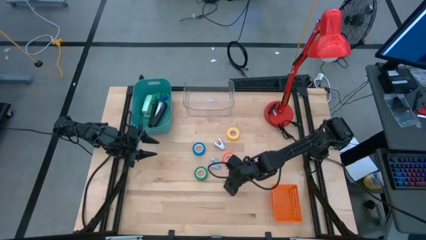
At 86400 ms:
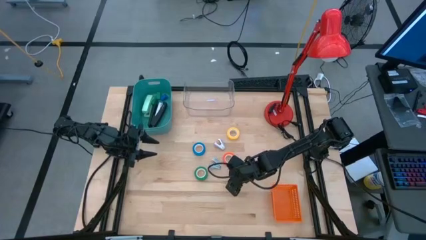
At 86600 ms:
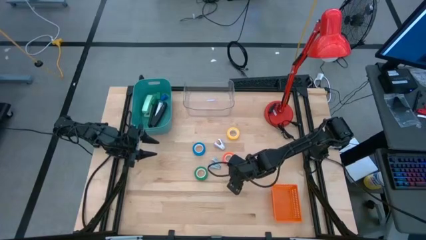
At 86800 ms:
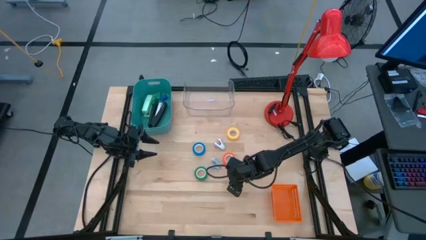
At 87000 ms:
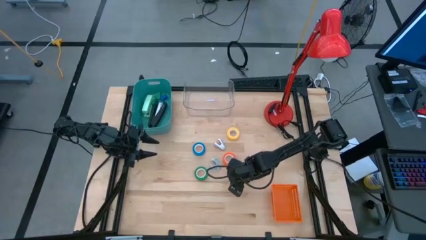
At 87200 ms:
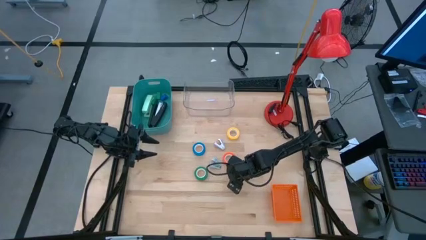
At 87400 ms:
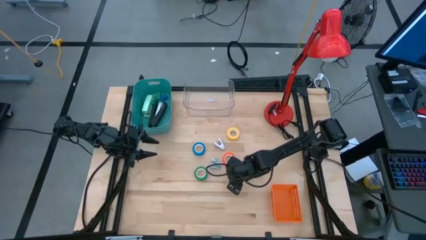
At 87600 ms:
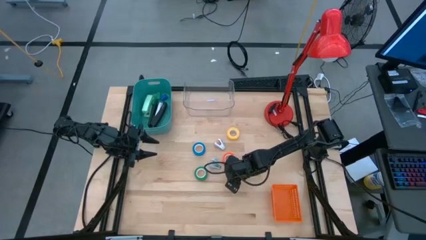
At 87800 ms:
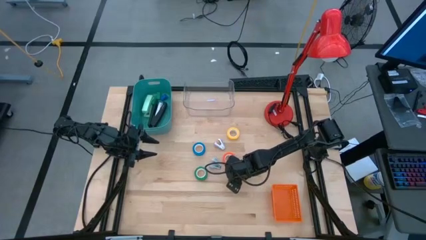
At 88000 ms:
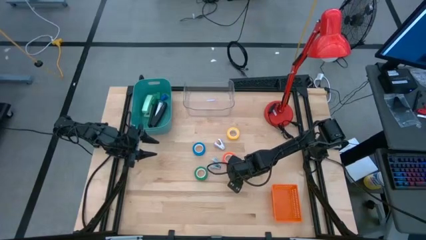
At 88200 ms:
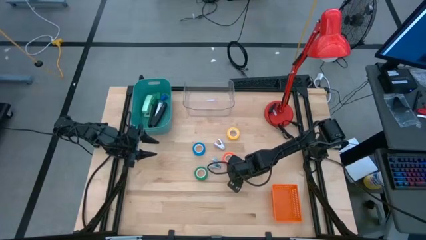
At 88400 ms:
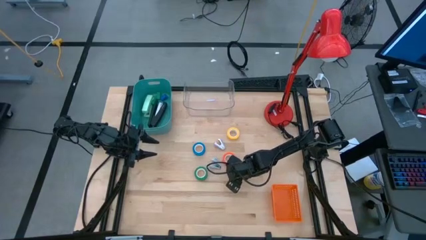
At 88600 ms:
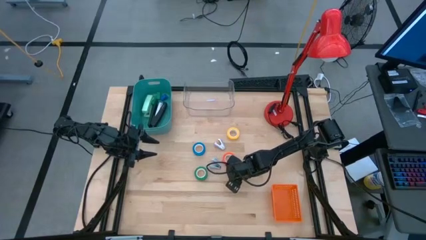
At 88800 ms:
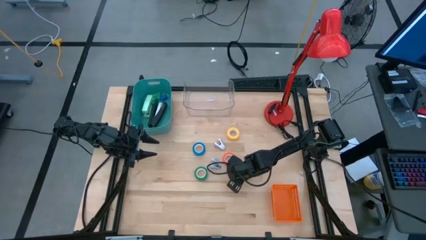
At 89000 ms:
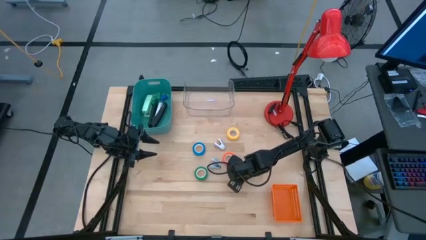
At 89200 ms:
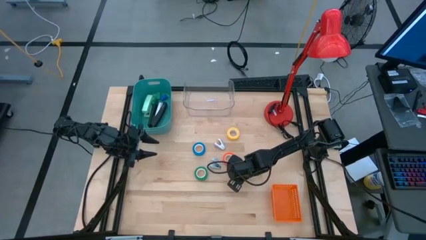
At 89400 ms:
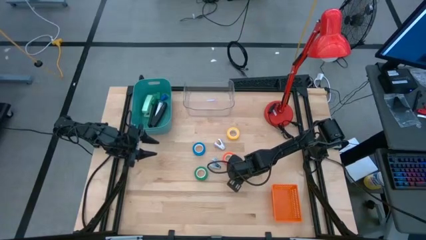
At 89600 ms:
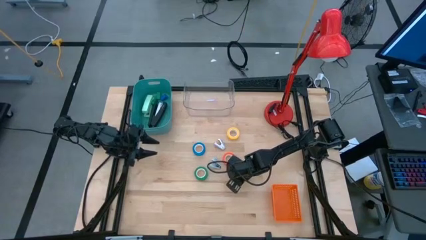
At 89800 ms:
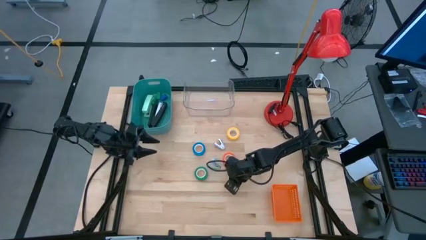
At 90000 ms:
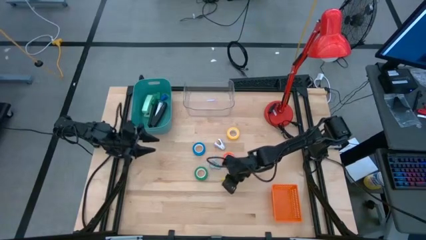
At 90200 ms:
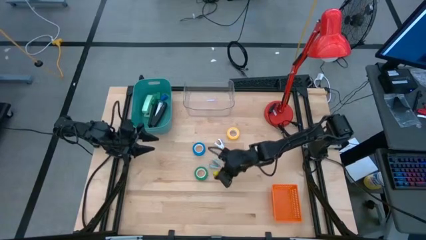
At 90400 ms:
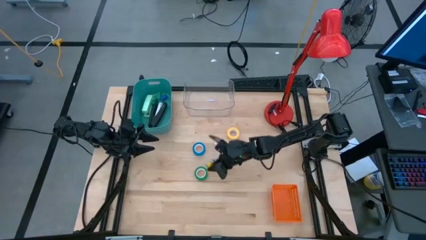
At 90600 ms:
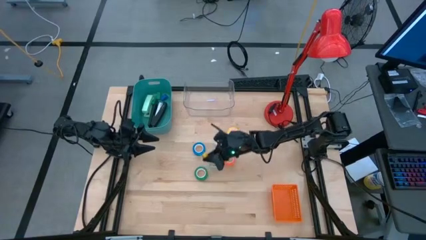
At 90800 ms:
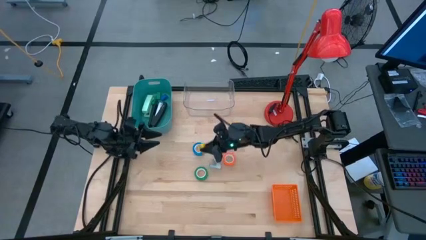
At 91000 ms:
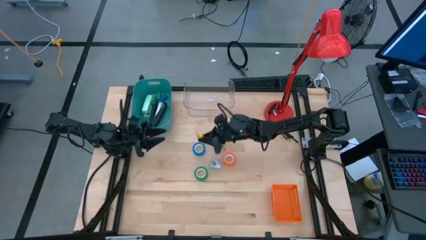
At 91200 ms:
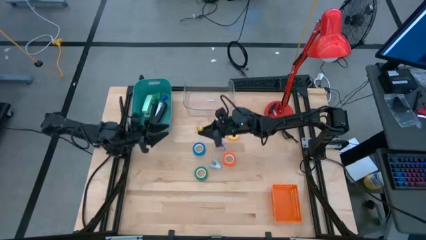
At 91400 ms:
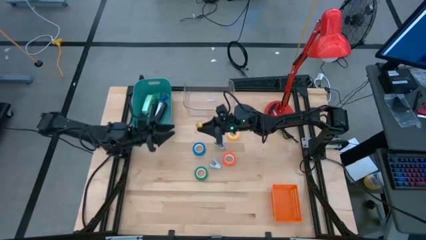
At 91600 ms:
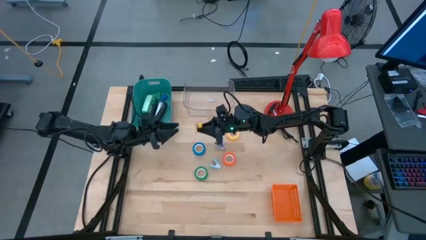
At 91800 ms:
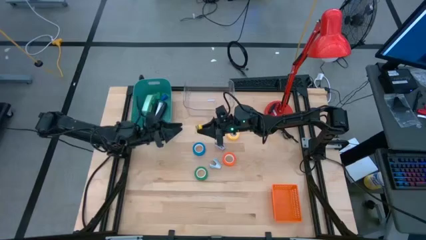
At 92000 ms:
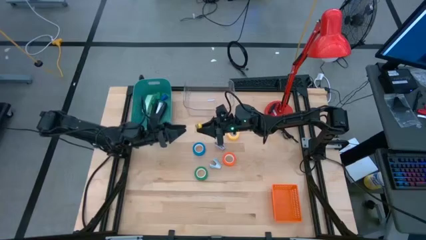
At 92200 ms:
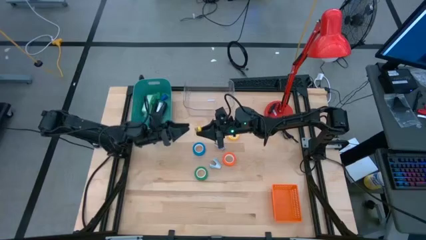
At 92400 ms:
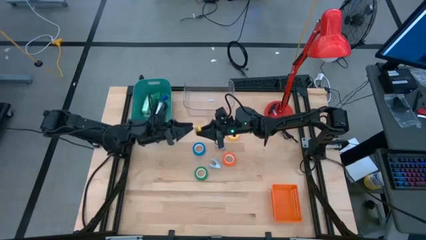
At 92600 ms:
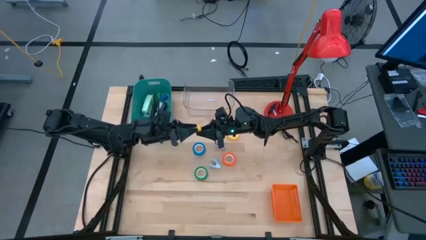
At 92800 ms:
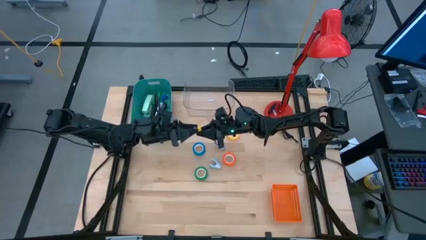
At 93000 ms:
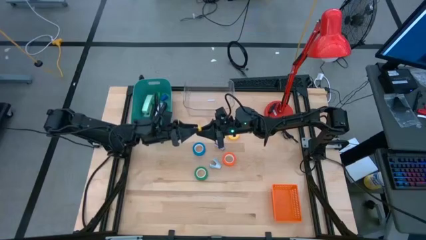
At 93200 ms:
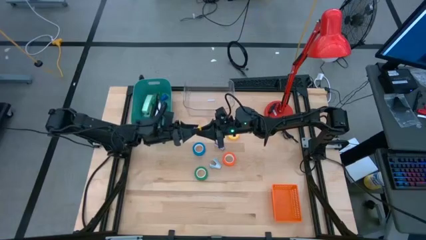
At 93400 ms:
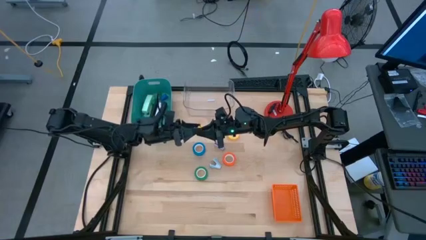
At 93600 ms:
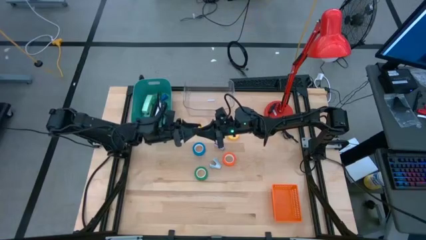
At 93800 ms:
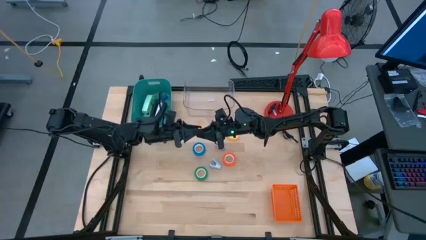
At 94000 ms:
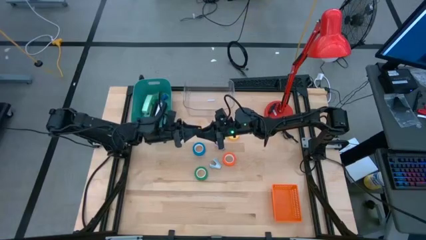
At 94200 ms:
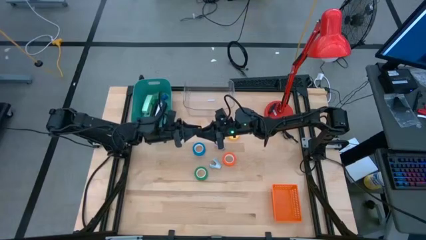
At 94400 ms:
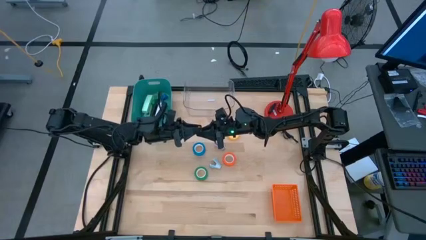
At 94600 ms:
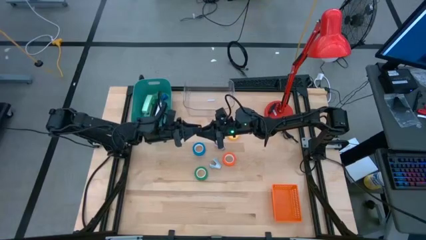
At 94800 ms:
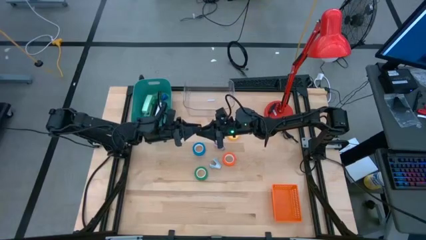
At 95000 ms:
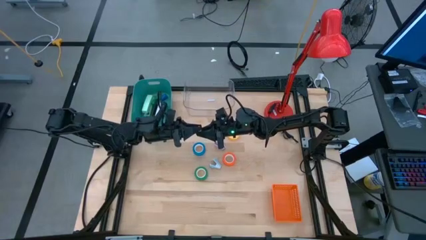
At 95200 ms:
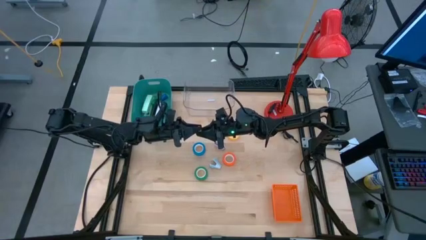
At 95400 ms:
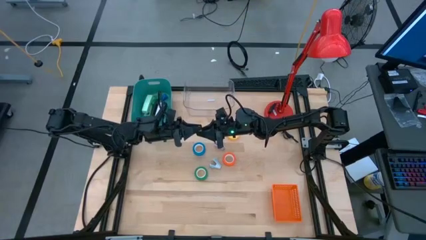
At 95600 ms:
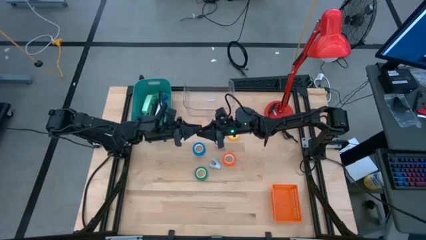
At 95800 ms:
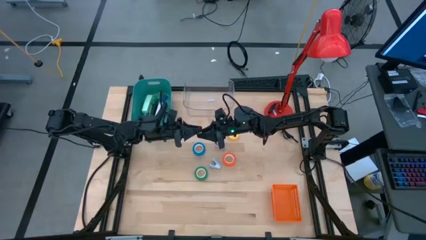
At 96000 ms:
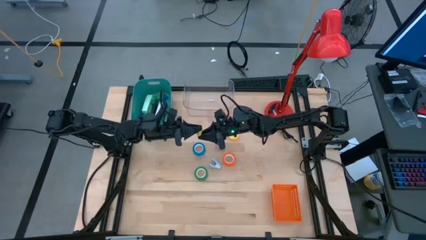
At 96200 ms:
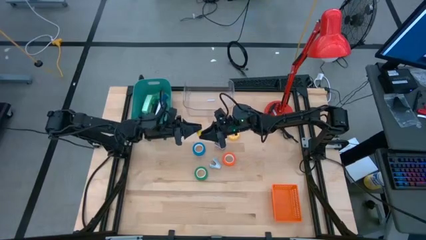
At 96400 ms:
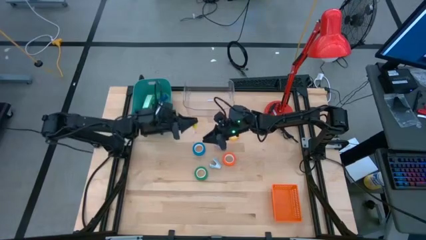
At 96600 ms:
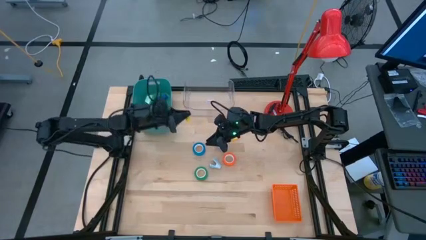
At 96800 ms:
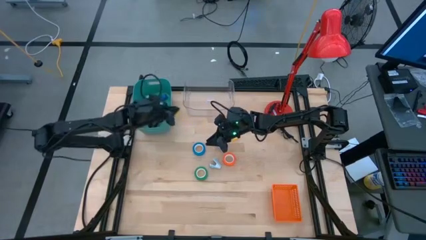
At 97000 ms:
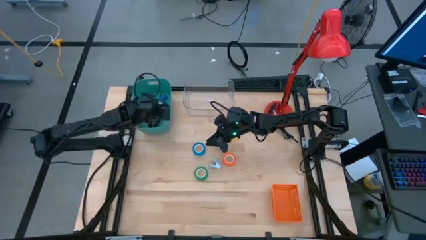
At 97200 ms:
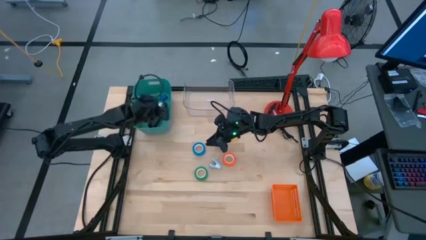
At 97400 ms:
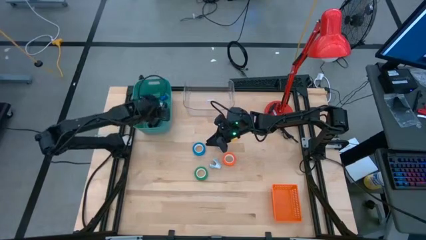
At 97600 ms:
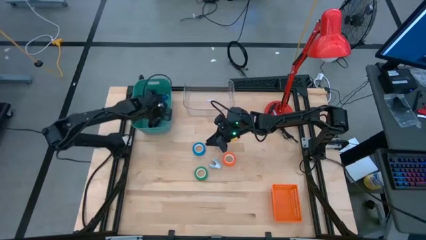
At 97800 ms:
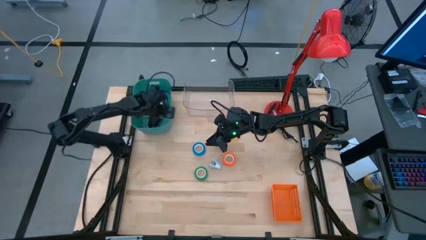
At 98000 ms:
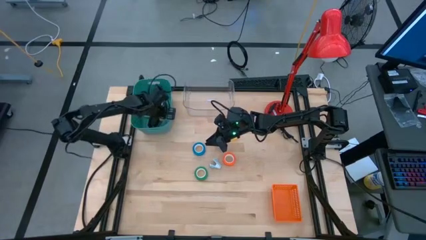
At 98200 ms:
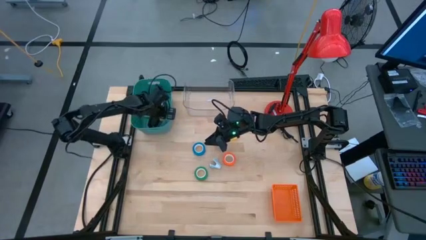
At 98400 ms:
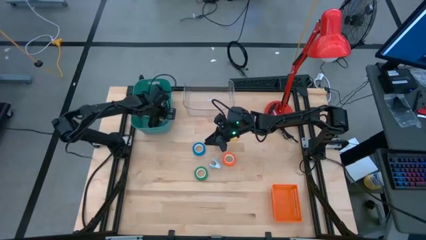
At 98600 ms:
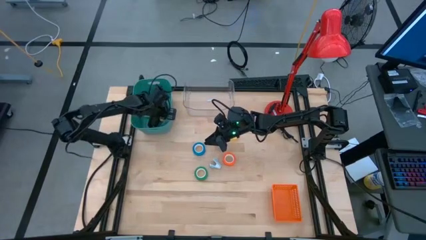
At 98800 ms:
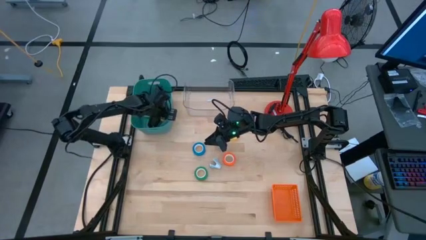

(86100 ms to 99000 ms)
Task: Pick and place Stapler, Stapler remover, tape
Put the yellow stapler into the green bin
